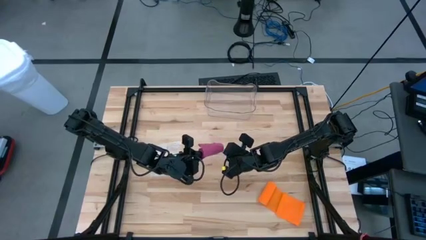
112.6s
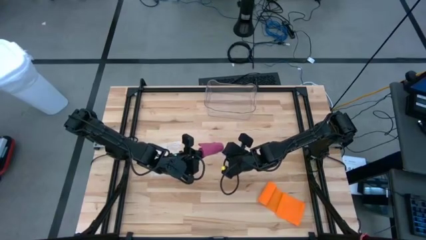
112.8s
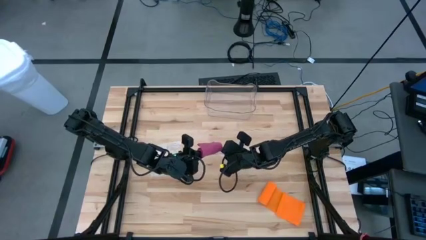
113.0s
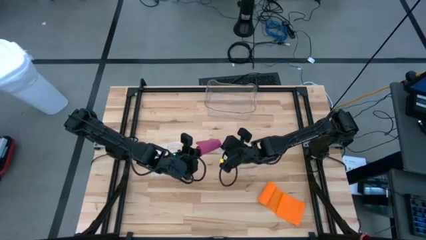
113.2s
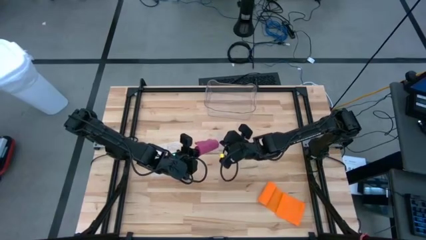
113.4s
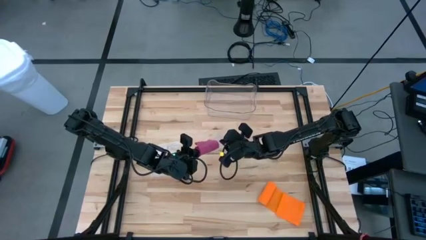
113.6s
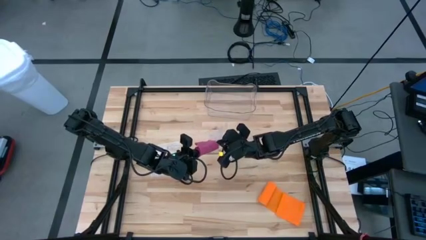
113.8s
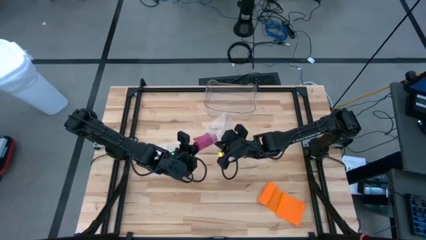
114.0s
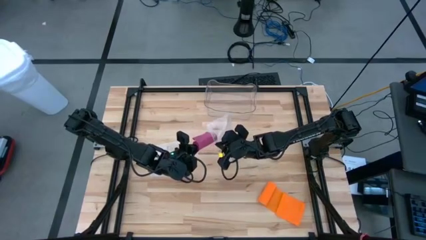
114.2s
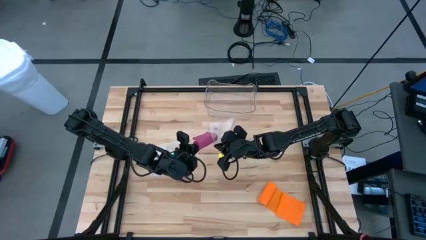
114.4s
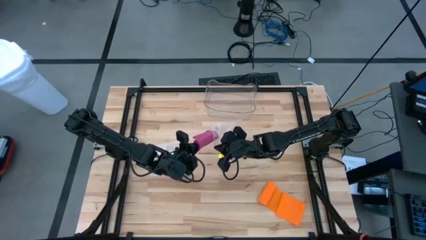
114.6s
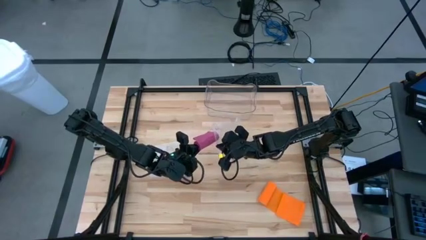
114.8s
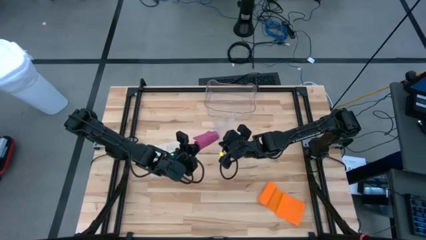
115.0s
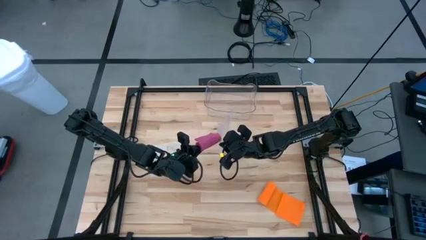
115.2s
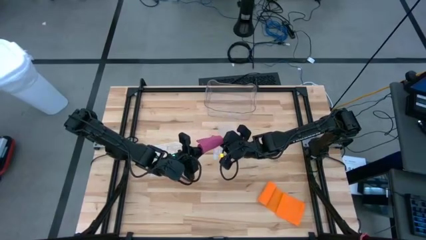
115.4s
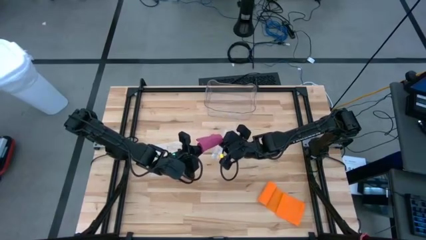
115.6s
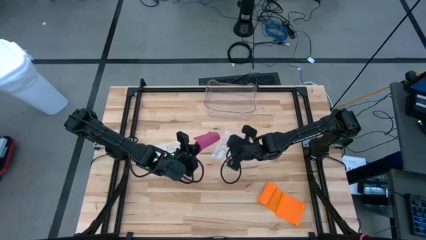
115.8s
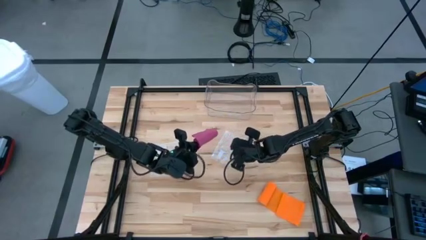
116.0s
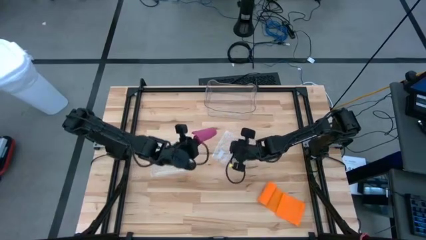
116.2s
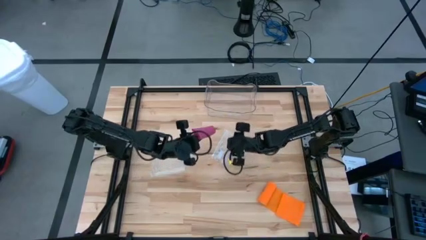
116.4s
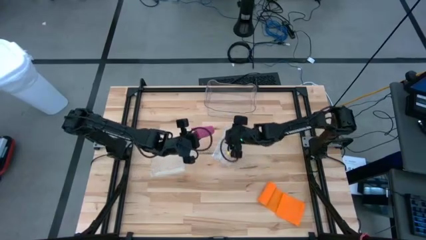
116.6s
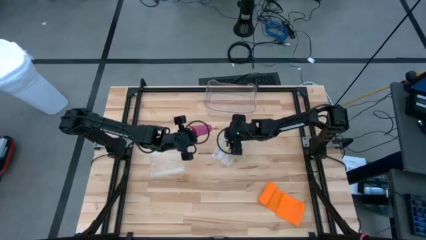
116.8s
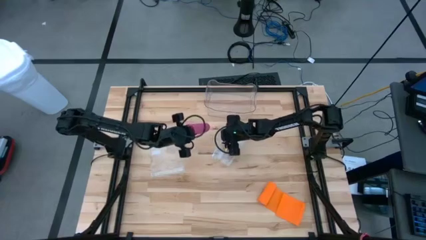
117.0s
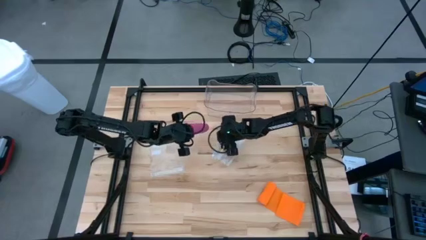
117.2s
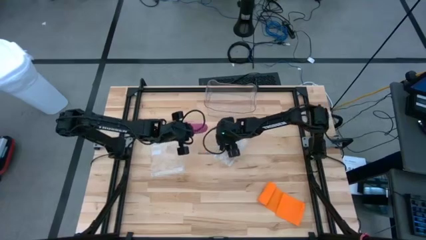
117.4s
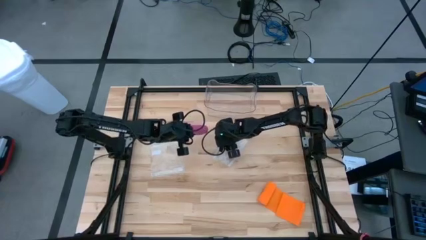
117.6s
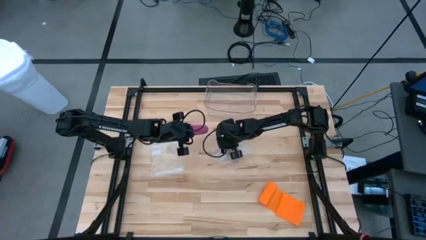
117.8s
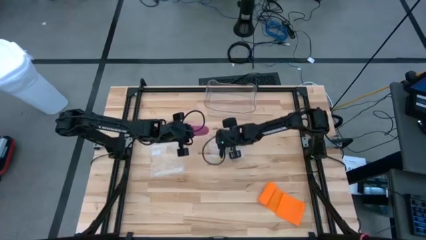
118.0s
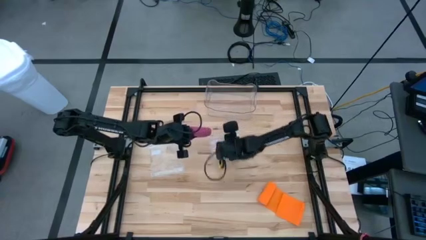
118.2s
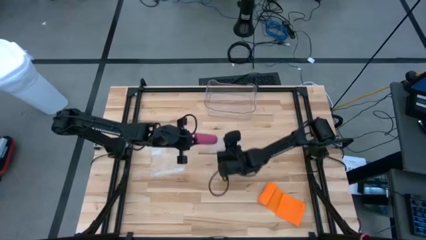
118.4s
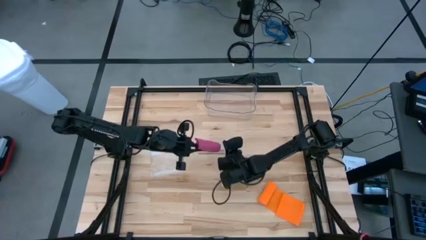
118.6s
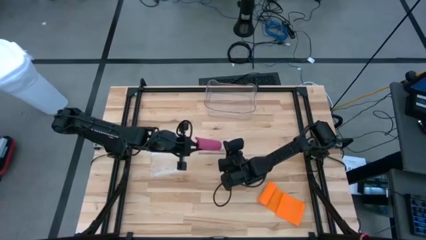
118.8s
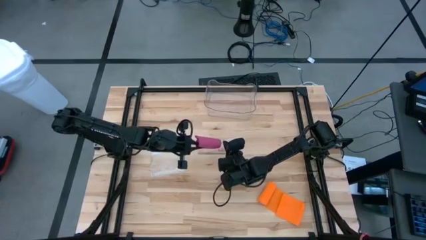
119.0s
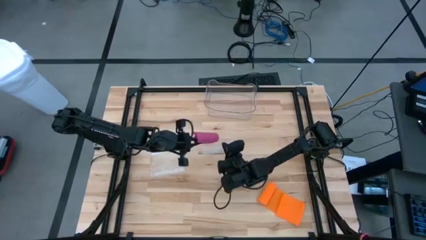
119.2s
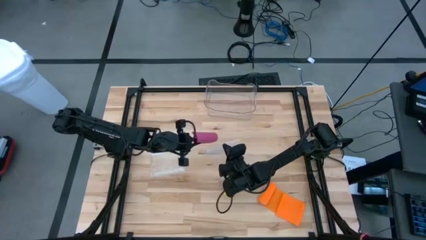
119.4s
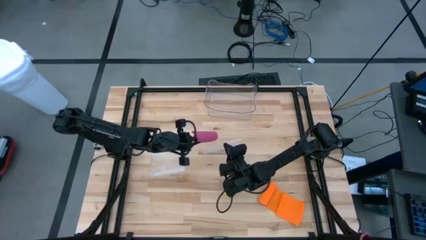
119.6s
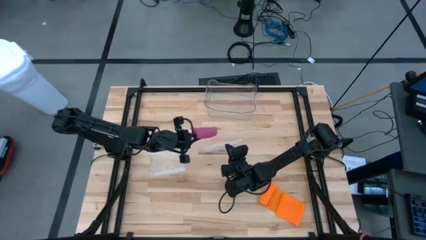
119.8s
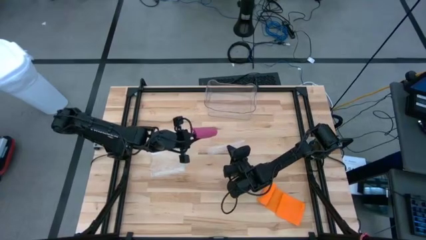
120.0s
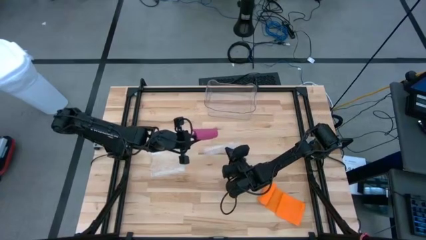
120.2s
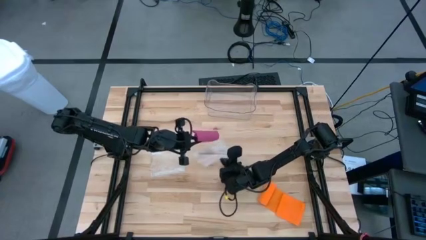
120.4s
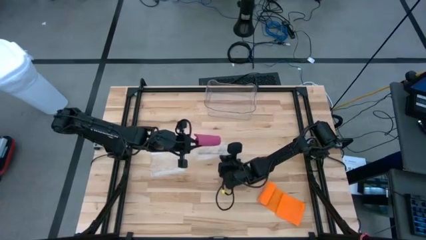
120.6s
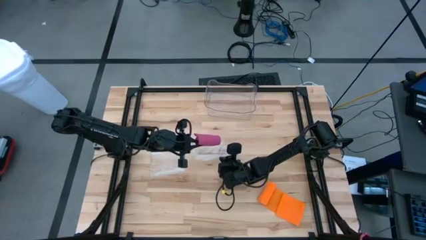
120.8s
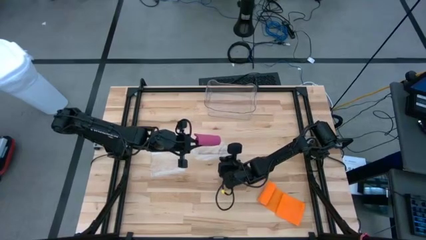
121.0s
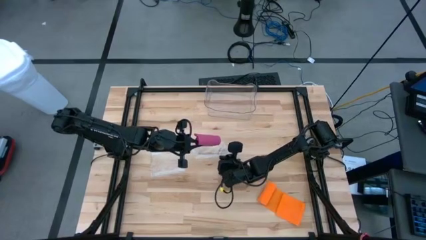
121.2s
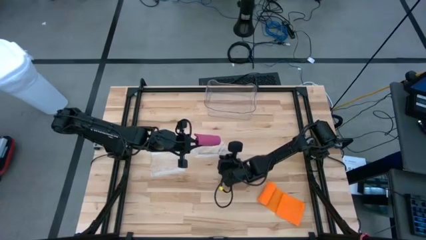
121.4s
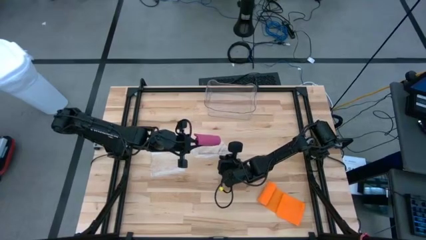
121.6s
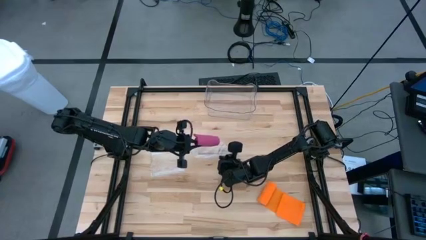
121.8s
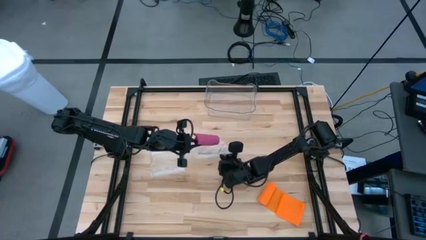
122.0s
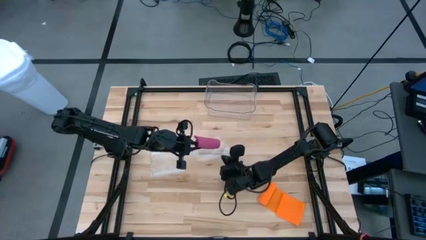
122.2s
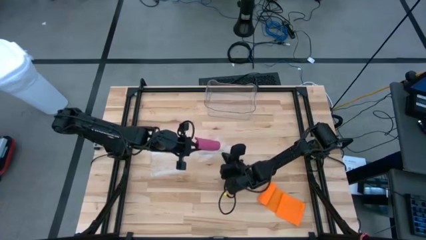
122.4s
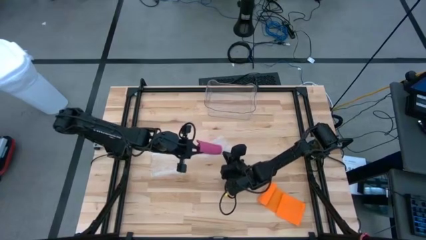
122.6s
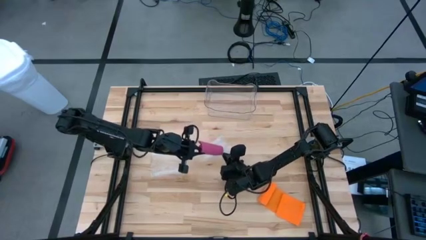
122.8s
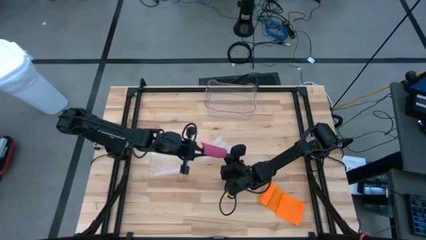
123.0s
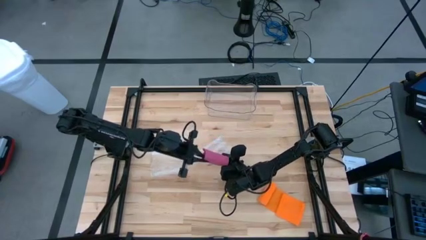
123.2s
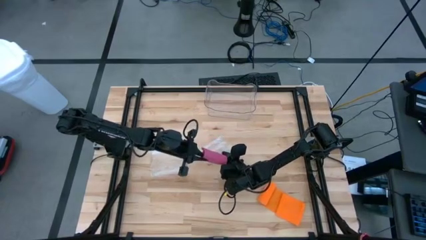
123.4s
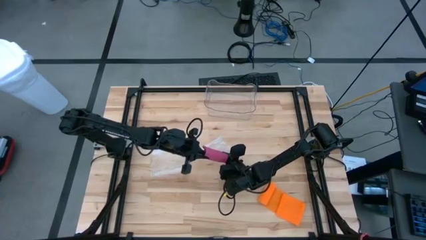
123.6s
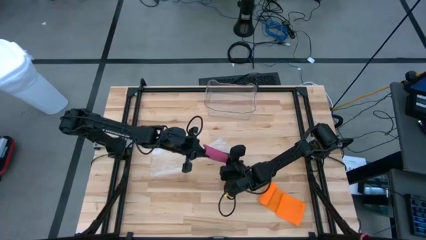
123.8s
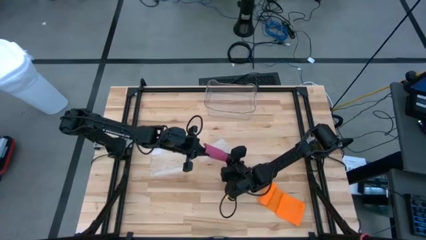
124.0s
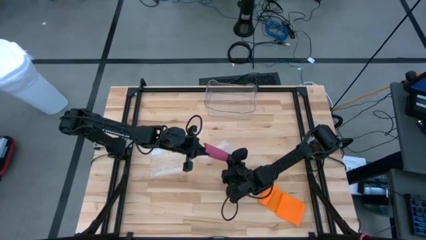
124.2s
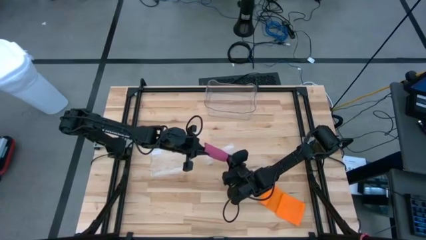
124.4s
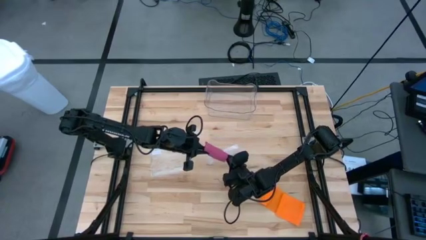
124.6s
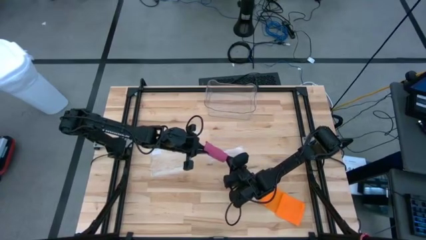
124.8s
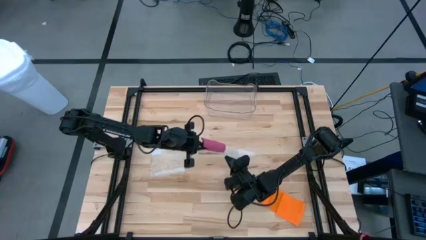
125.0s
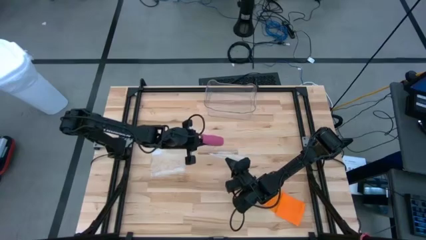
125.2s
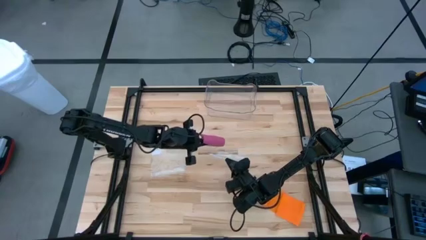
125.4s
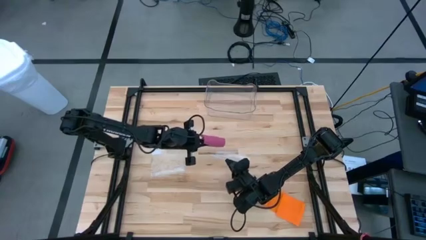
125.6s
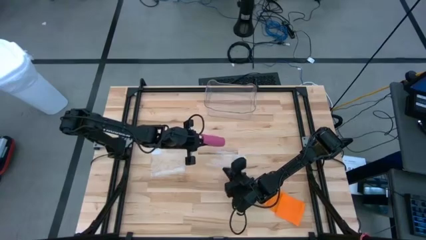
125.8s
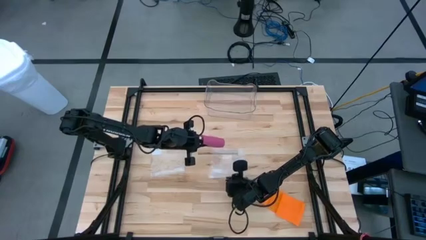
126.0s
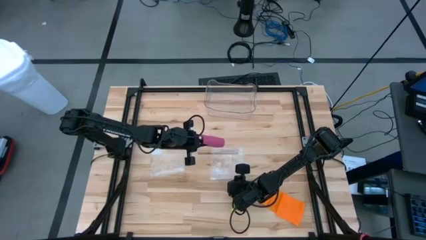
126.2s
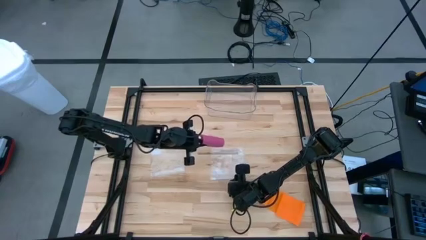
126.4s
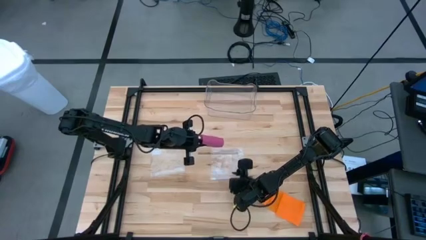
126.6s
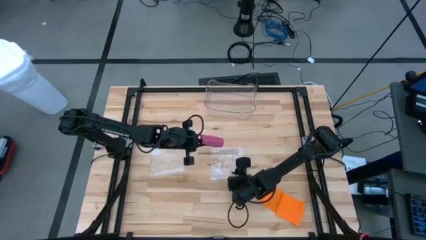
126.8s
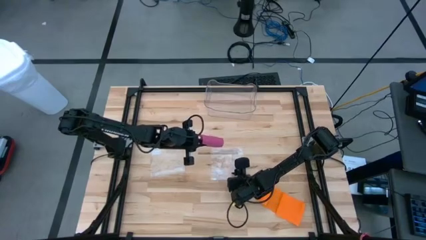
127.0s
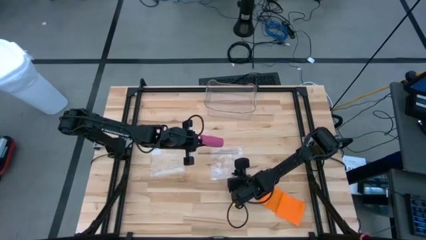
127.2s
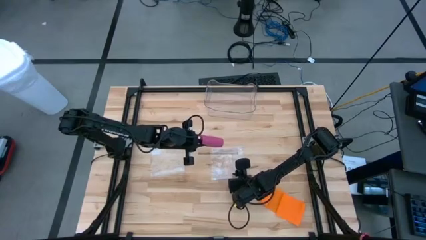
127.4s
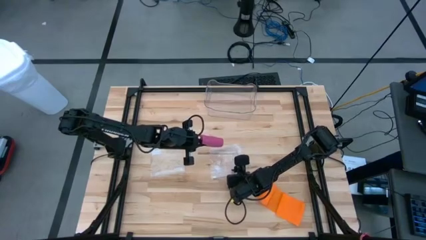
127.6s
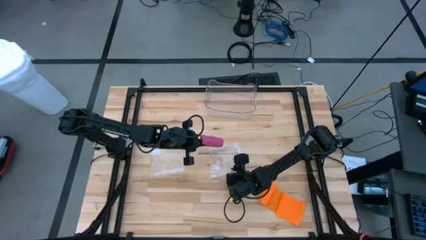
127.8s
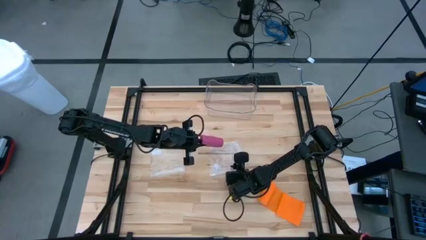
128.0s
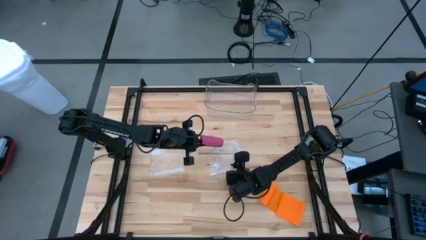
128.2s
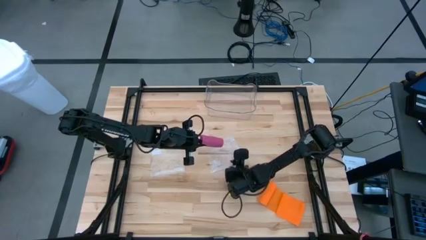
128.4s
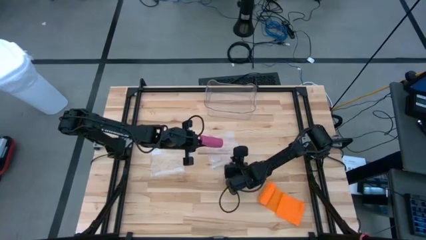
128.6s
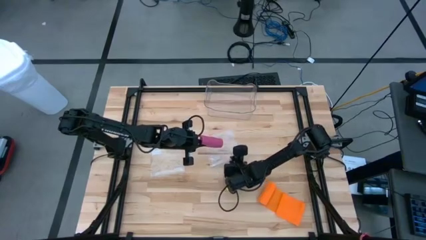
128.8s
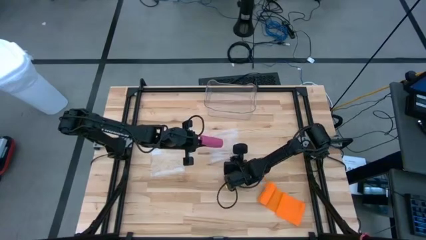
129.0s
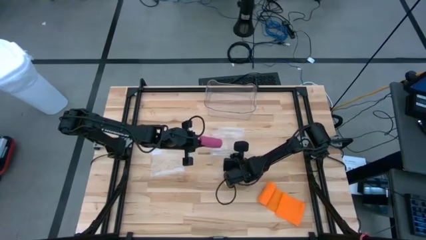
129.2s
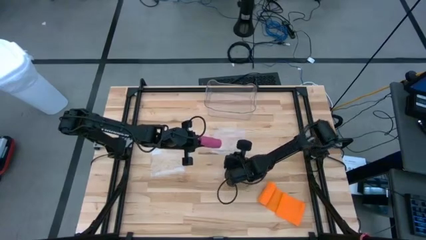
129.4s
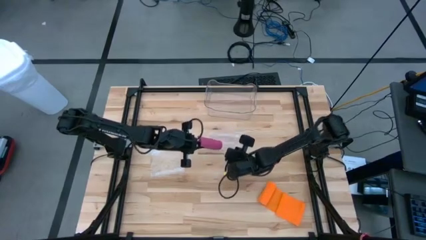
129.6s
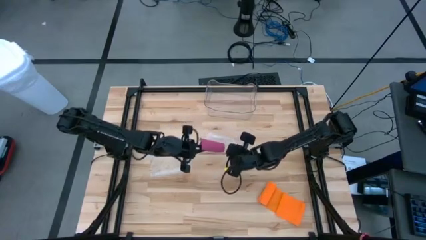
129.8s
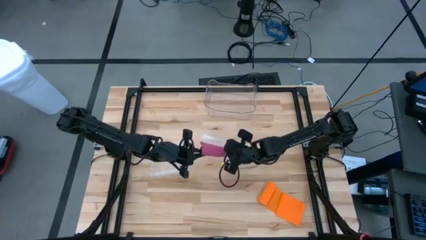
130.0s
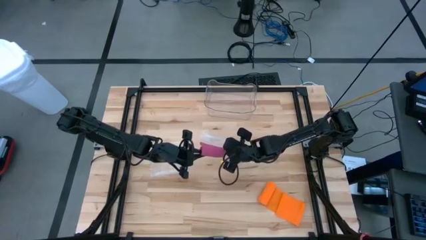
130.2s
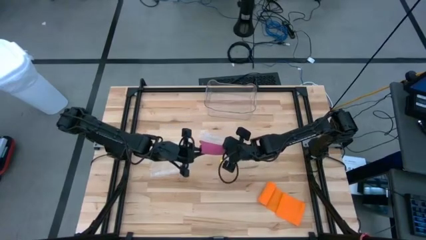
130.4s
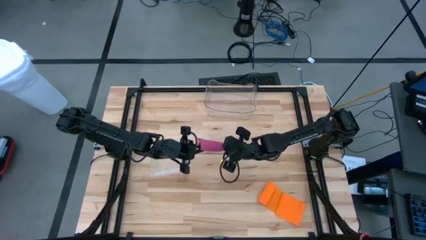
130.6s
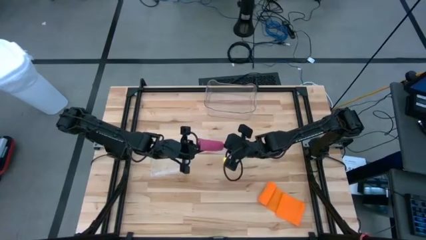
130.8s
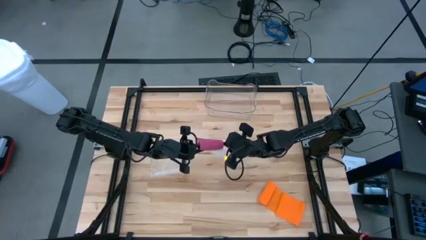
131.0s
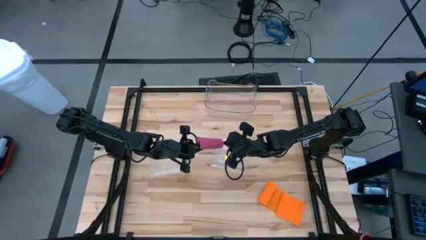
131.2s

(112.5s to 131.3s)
Task: Roll bandage
Put the pink bandage into the zip bag
